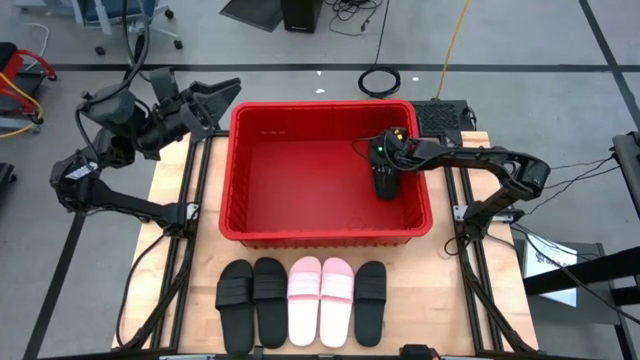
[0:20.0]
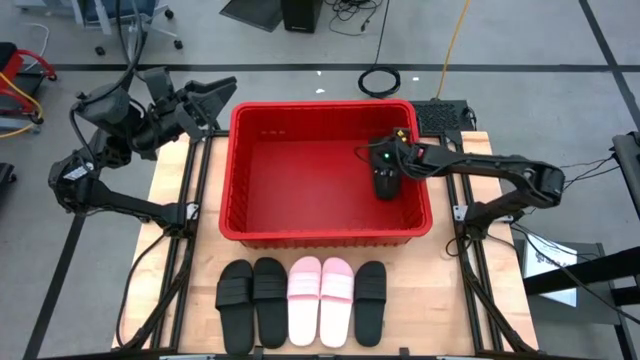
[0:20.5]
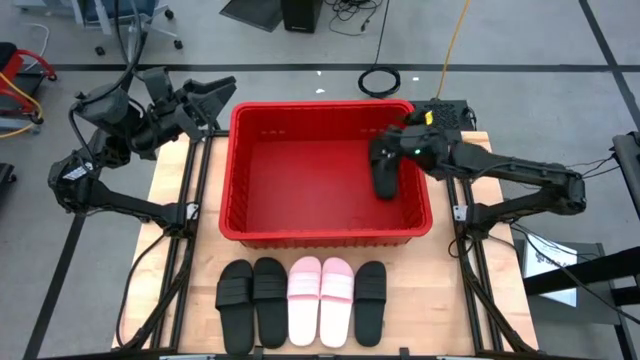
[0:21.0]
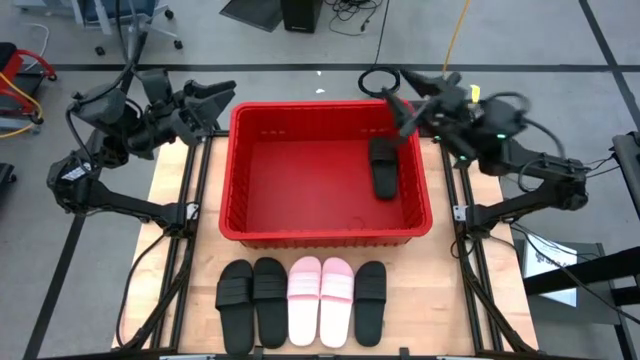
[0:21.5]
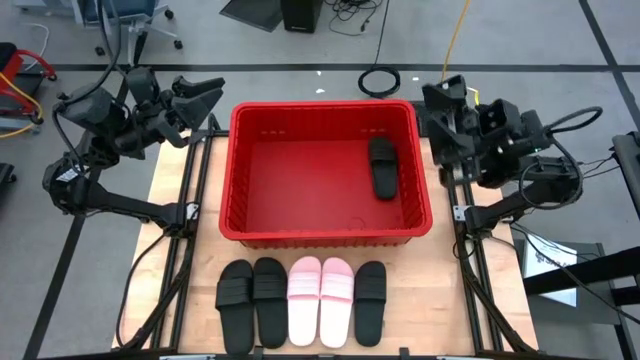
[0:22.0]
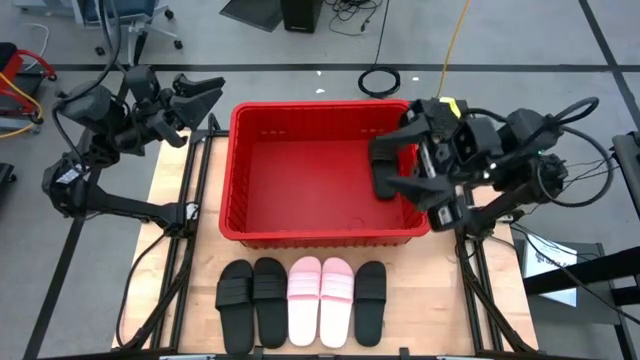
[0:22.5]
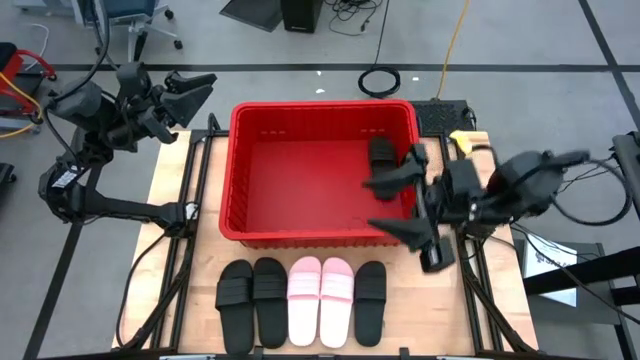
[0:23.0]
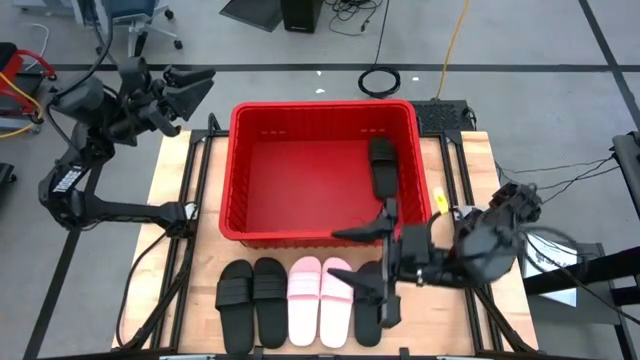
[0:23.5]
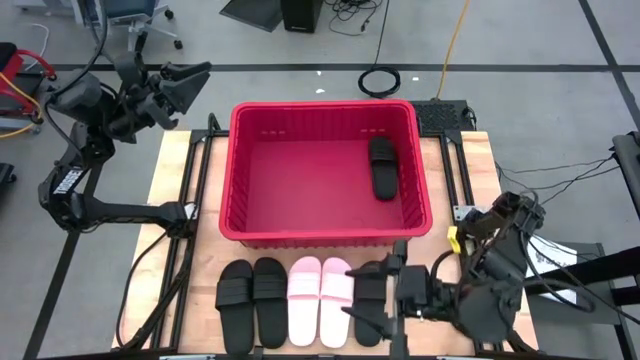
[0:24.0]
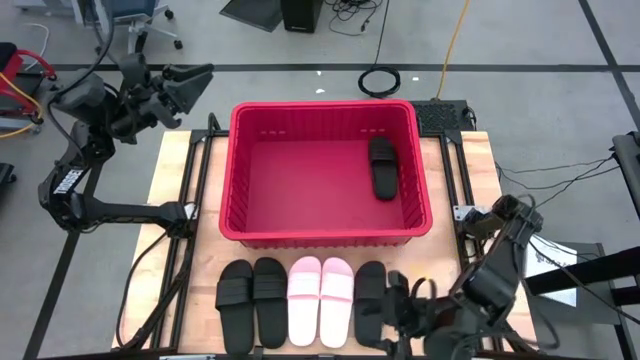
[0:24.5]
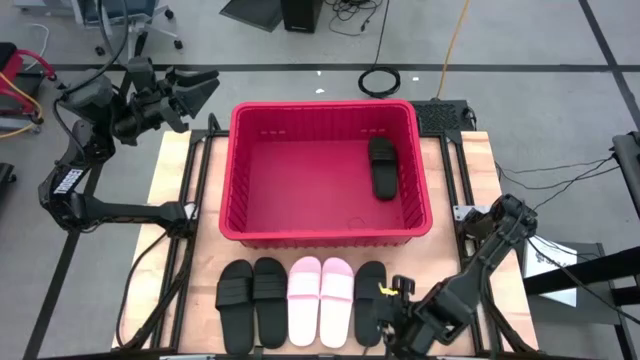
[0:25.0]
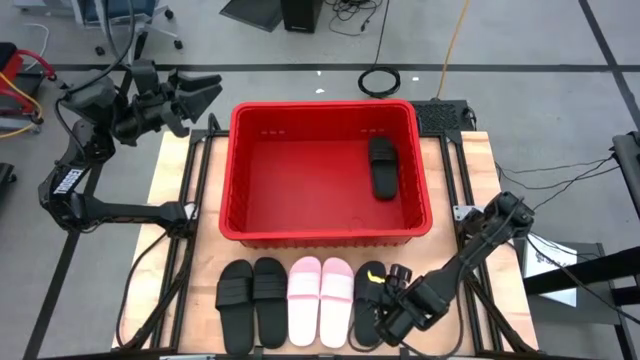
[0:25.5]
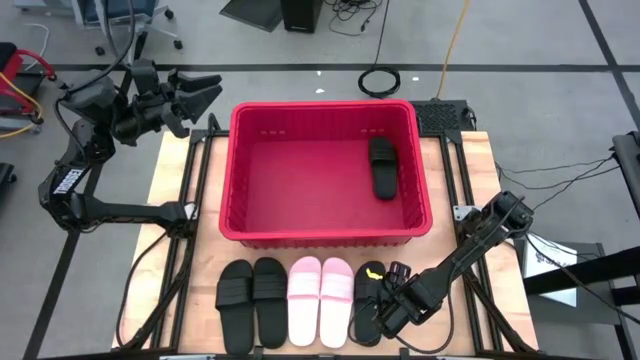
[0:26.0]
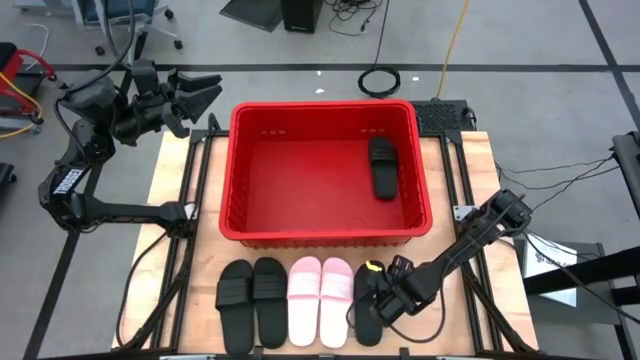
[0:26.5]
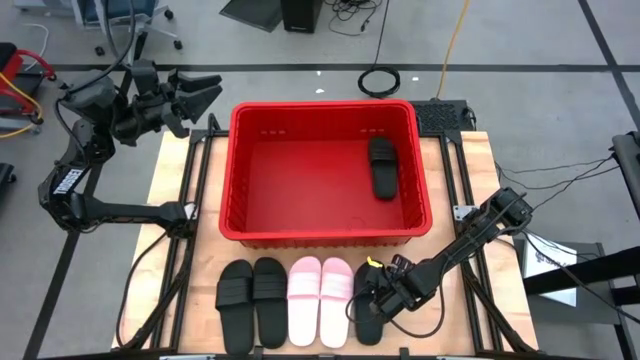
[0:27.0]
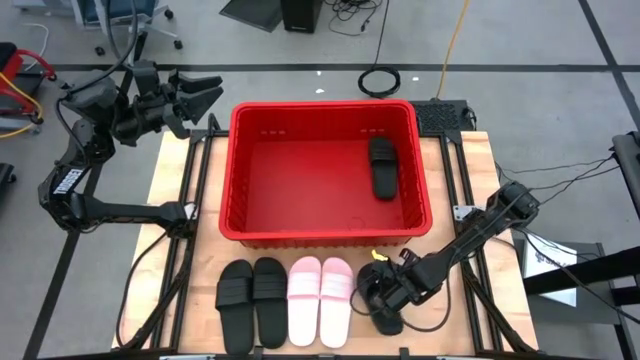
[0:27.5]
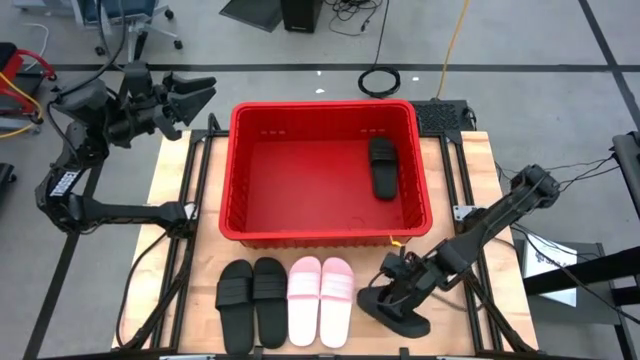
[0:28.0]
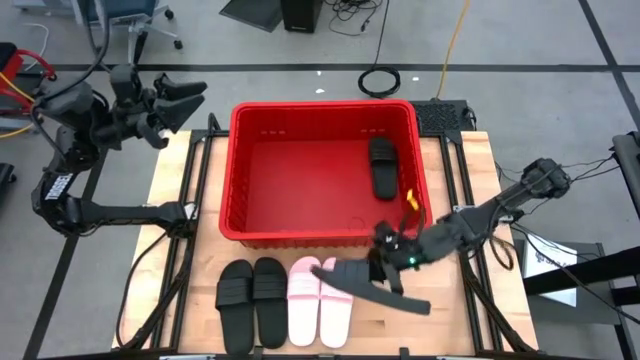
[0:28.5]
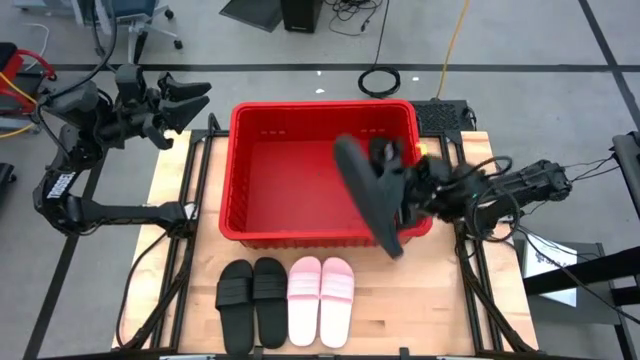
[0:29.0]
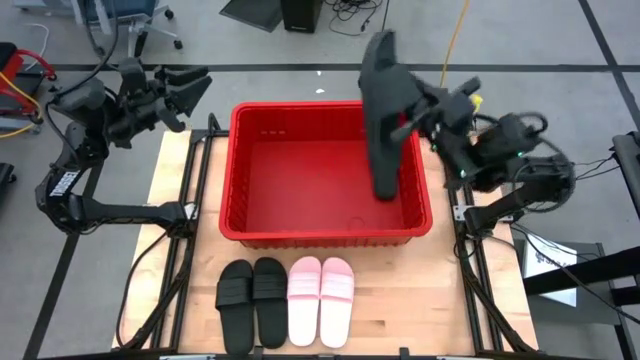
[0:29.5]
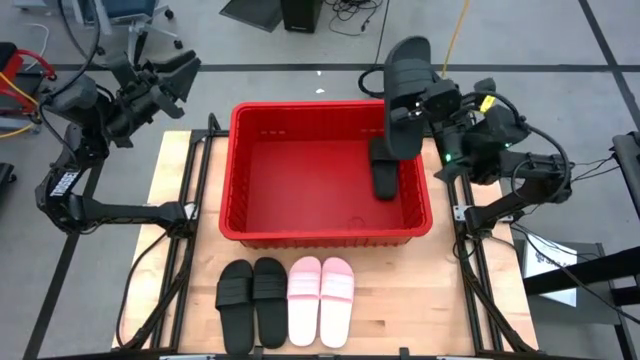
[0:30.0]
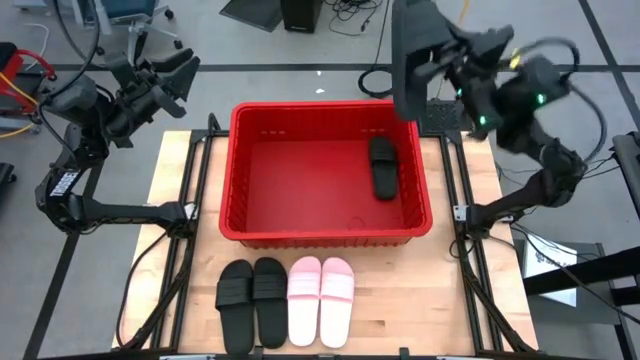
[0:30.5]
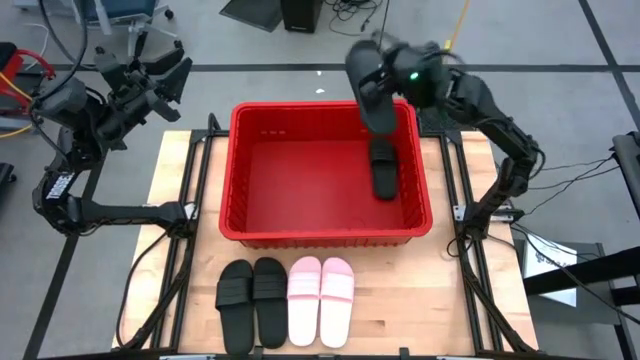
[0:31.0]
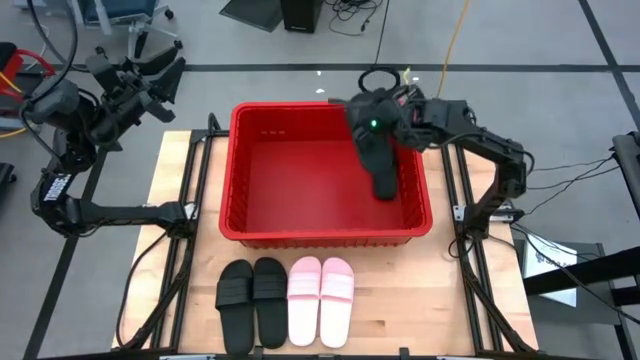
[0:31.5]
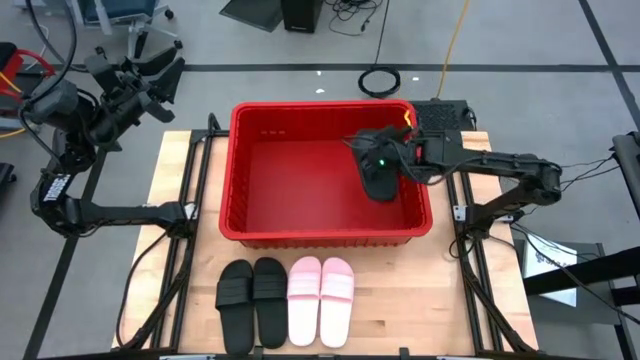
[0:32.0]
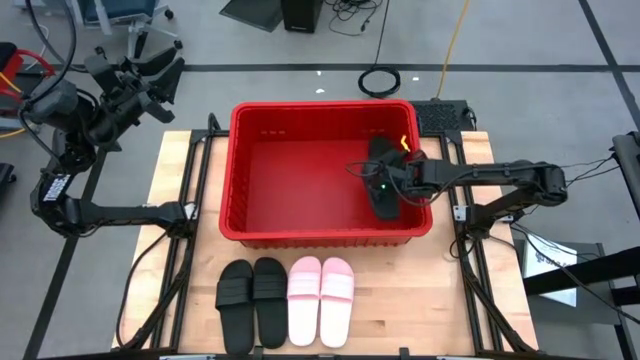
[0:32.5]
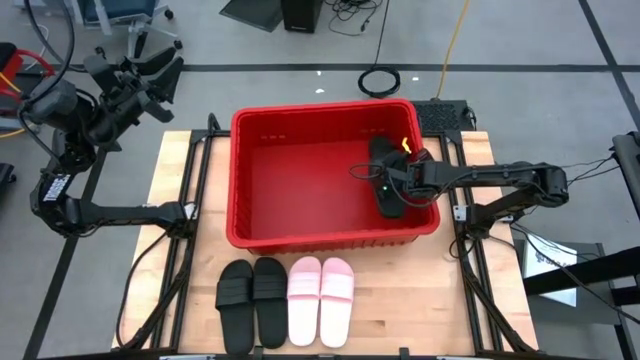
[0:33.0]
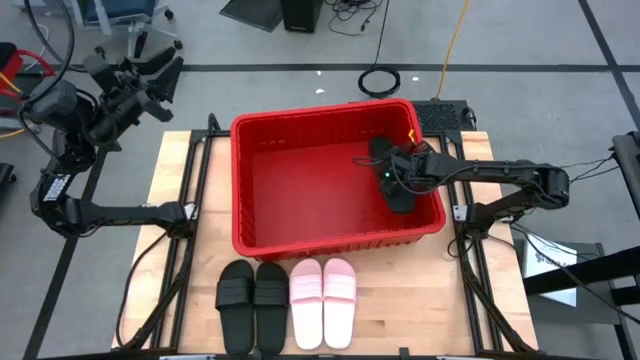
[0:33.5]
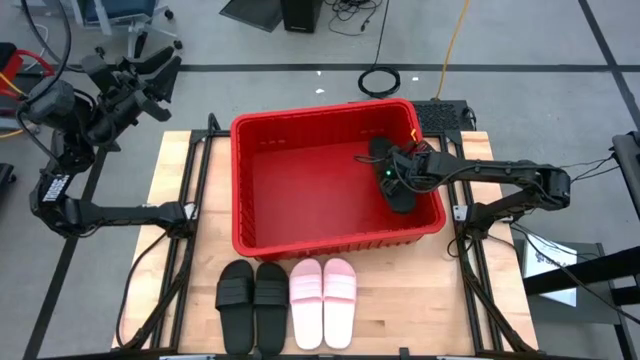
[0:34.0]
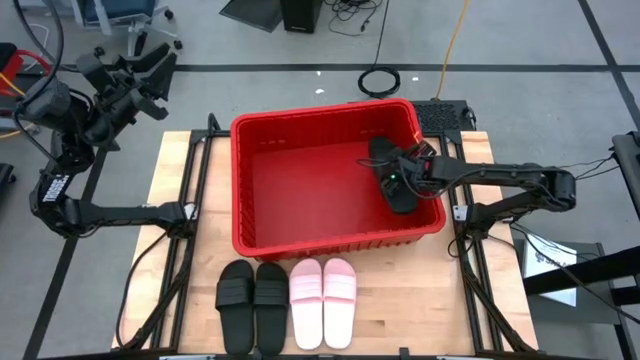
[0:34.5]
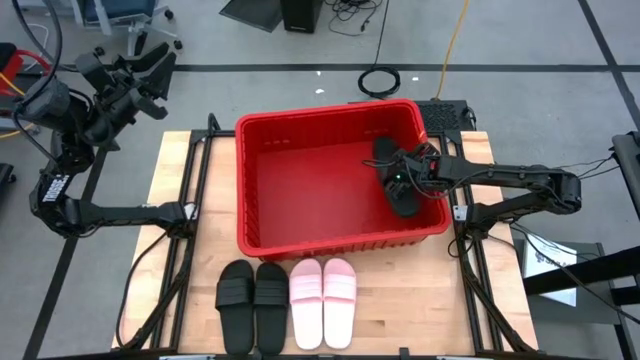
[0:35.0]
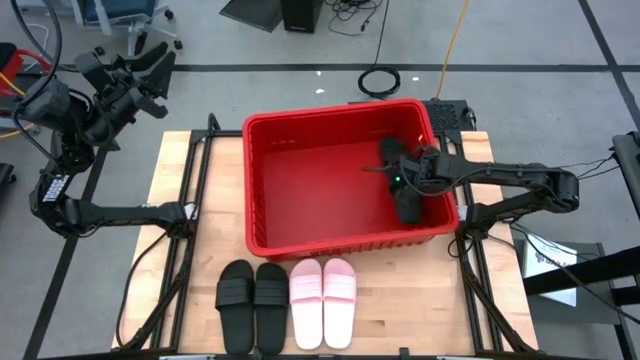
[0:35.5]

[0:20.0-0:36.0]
Task: Pick and place slides into bin
Put the black slide into the red container

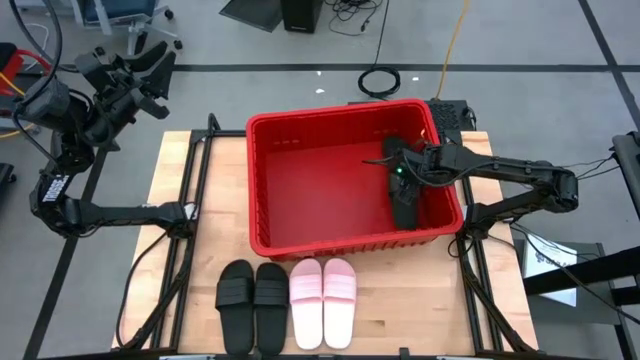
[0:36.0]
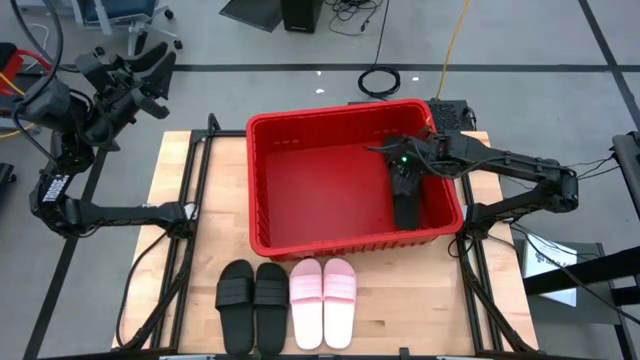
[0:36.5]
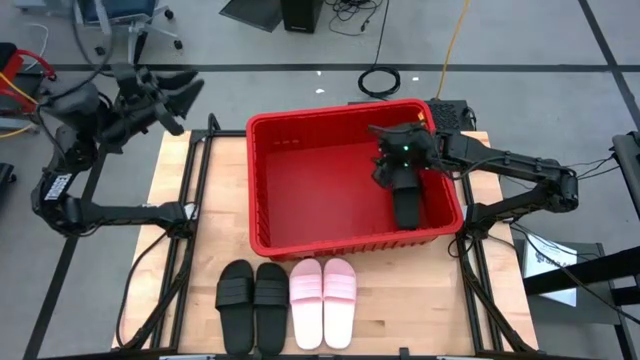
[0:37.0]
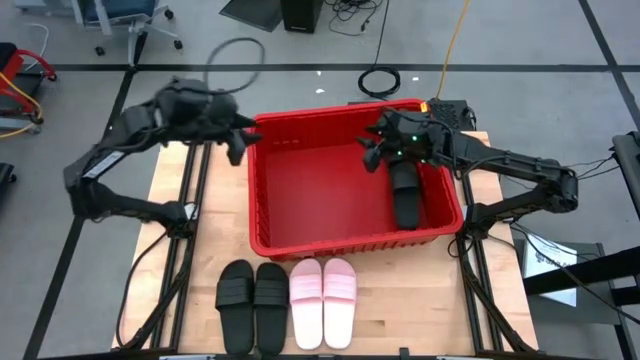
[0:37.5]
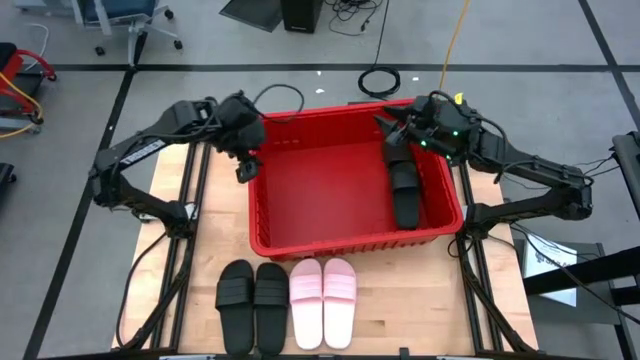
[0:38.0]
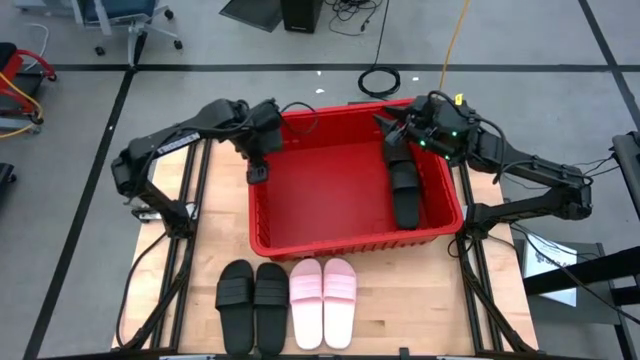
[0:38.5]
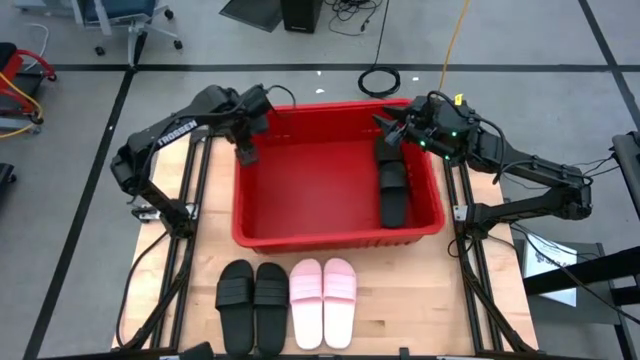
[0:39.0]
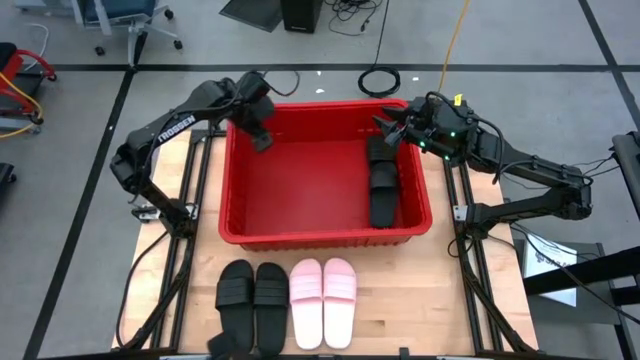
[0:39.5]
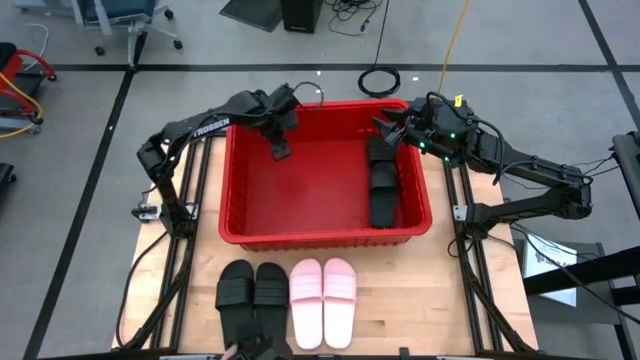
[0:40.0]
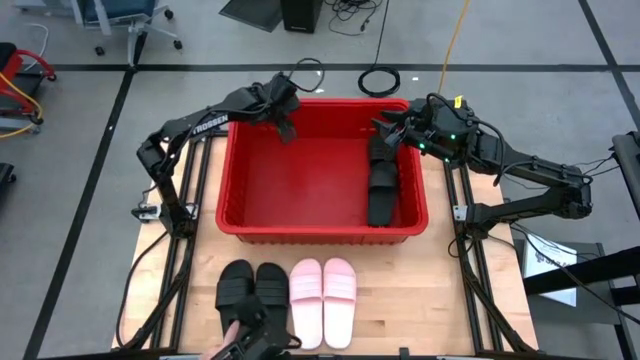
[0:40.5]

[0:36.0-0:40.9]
Adjust the red container
